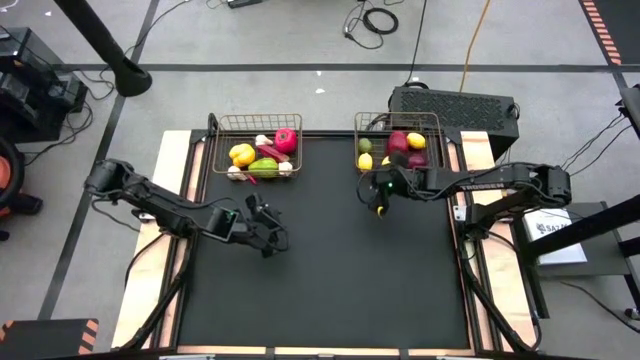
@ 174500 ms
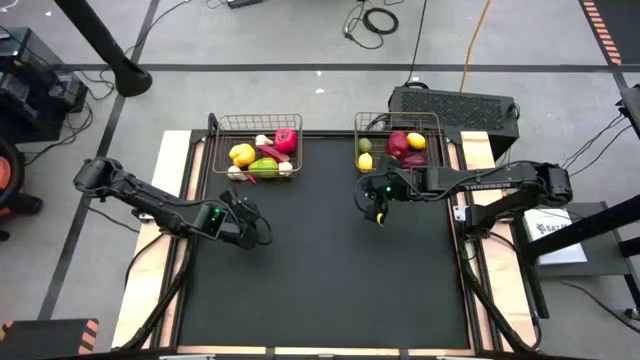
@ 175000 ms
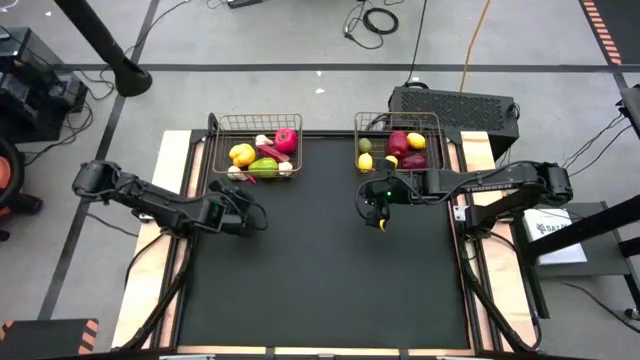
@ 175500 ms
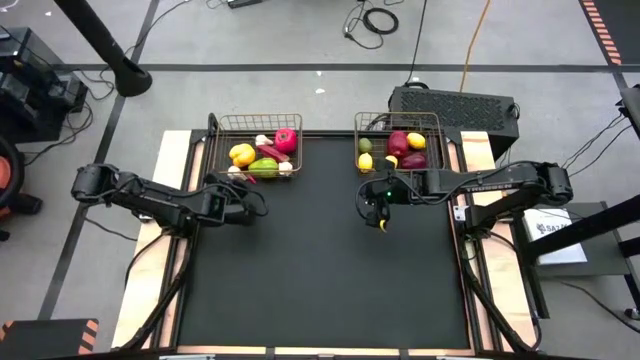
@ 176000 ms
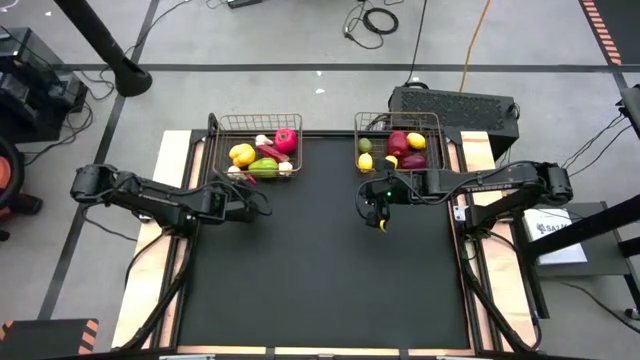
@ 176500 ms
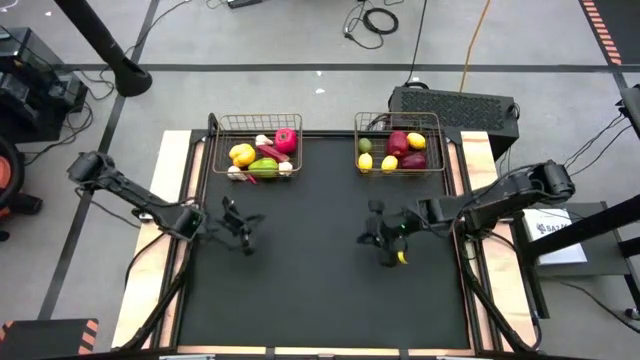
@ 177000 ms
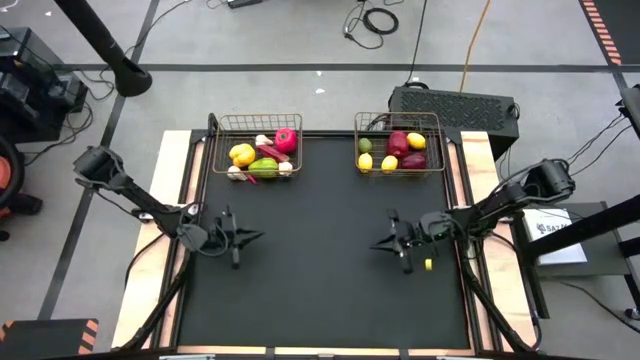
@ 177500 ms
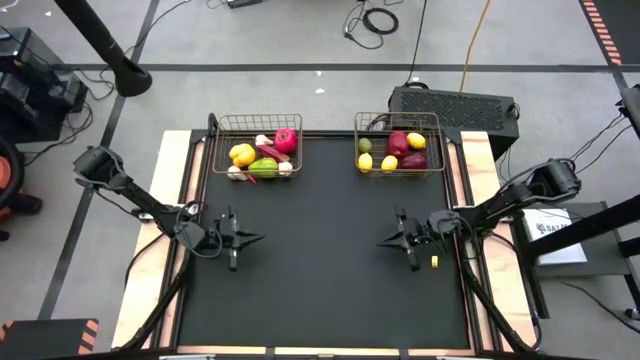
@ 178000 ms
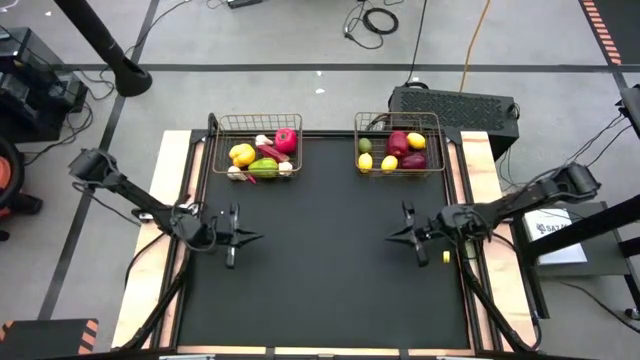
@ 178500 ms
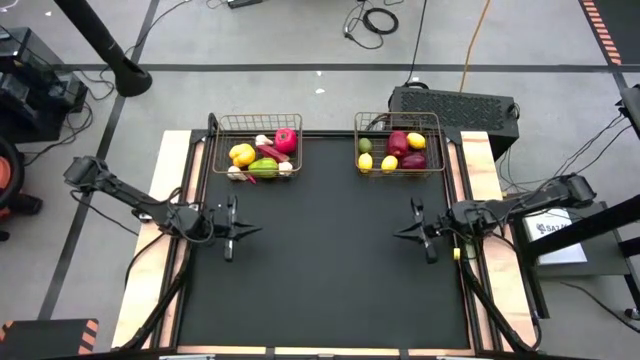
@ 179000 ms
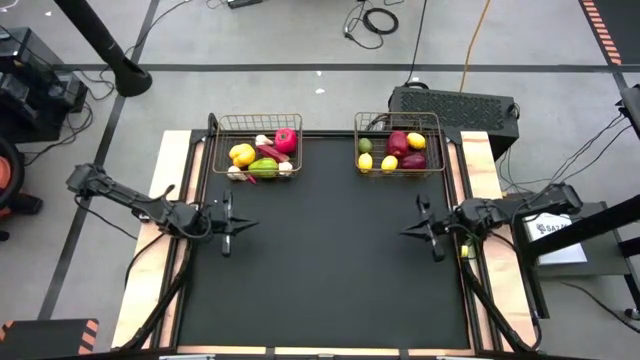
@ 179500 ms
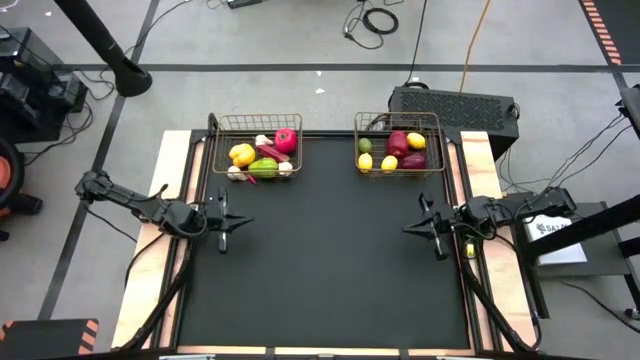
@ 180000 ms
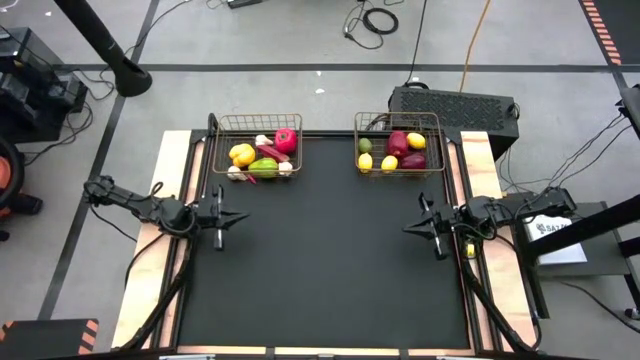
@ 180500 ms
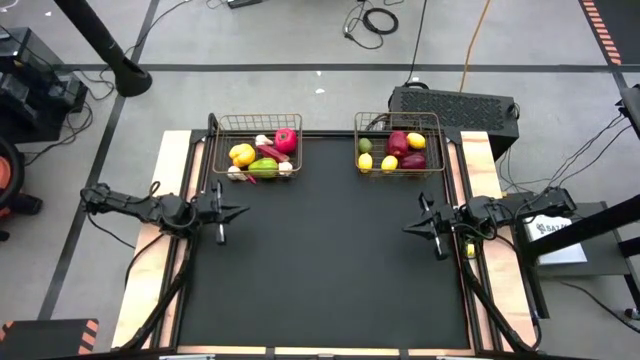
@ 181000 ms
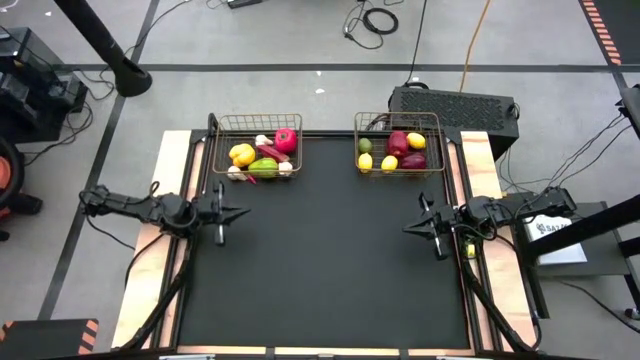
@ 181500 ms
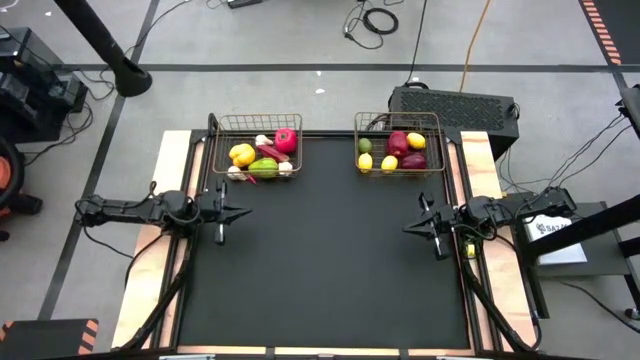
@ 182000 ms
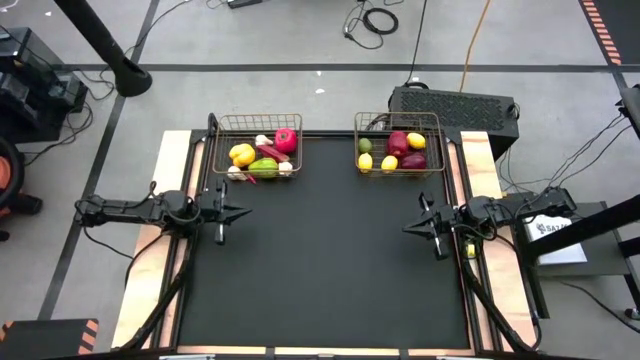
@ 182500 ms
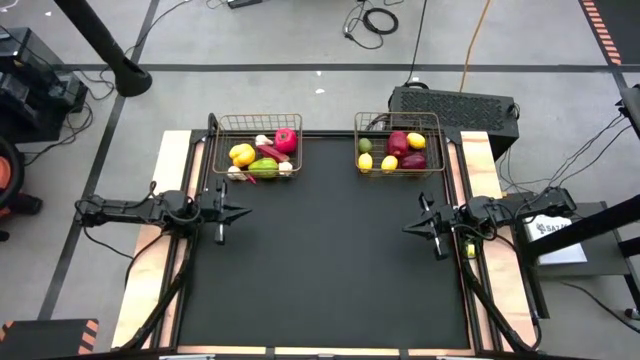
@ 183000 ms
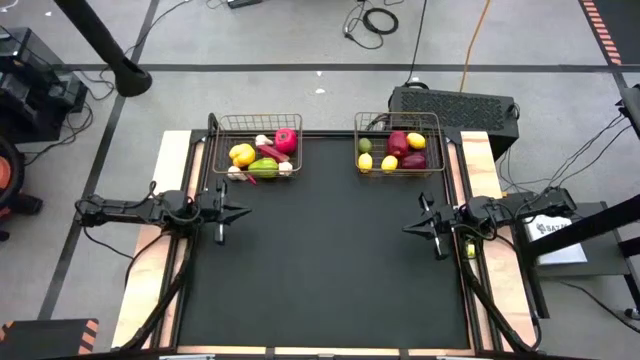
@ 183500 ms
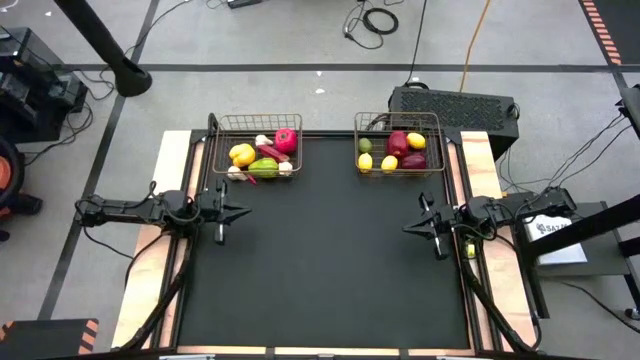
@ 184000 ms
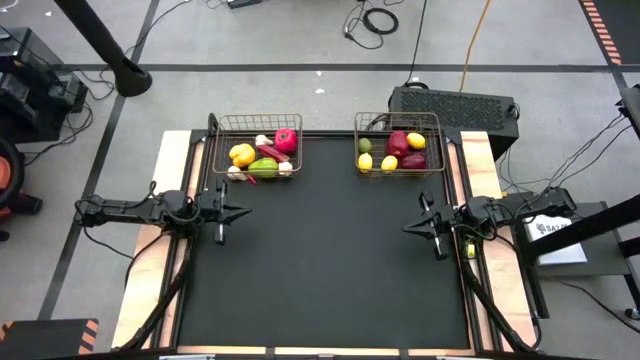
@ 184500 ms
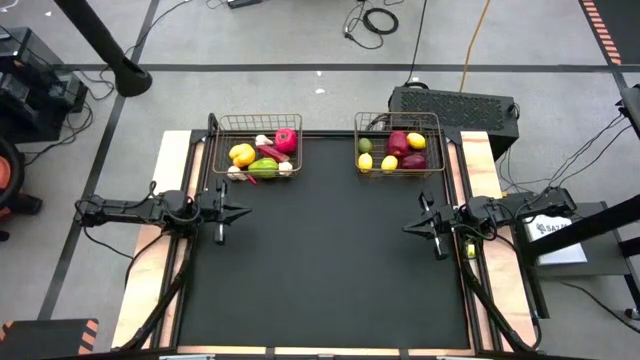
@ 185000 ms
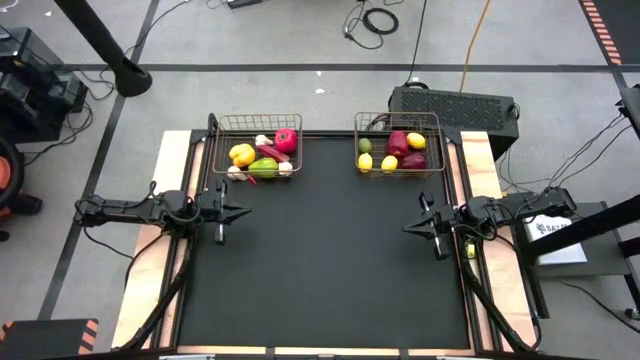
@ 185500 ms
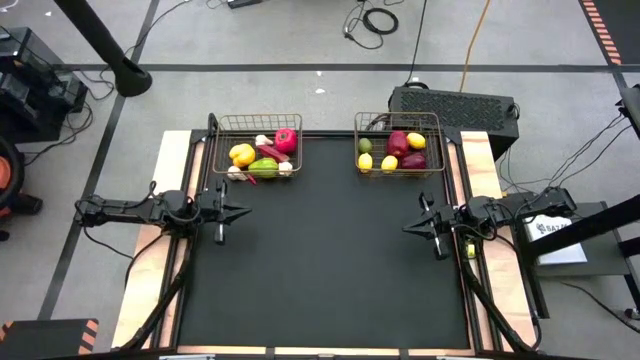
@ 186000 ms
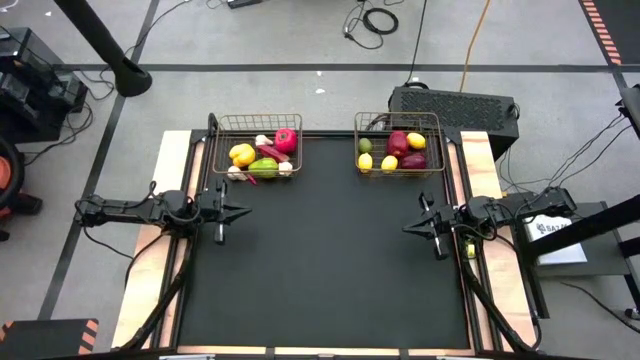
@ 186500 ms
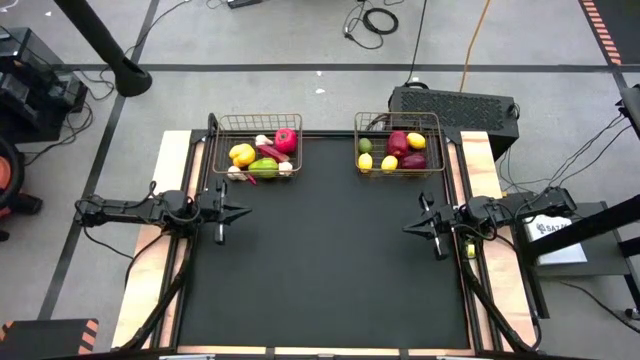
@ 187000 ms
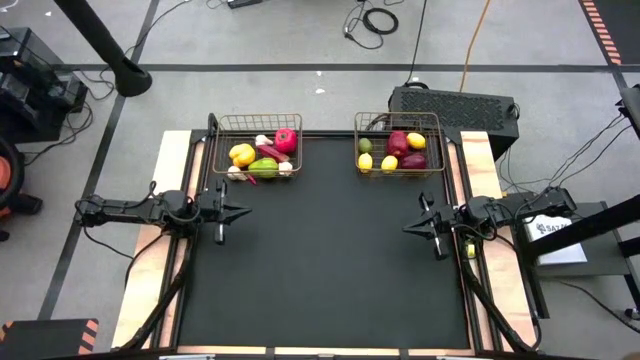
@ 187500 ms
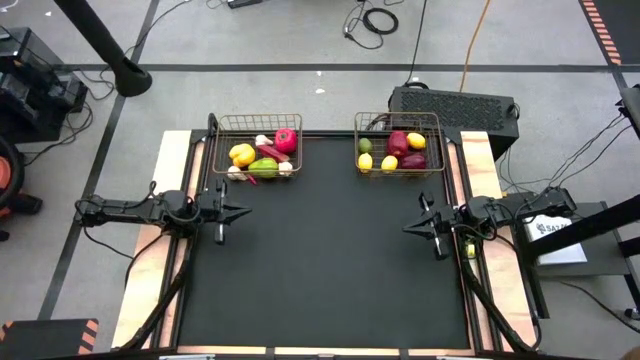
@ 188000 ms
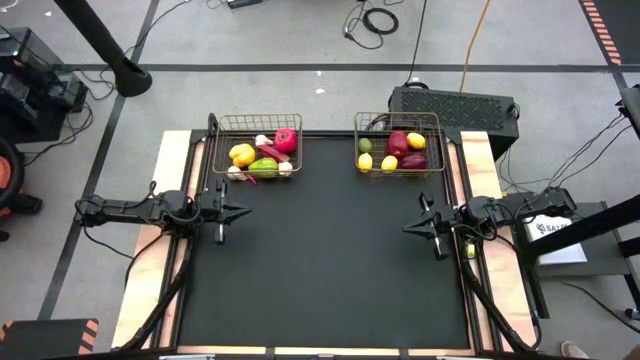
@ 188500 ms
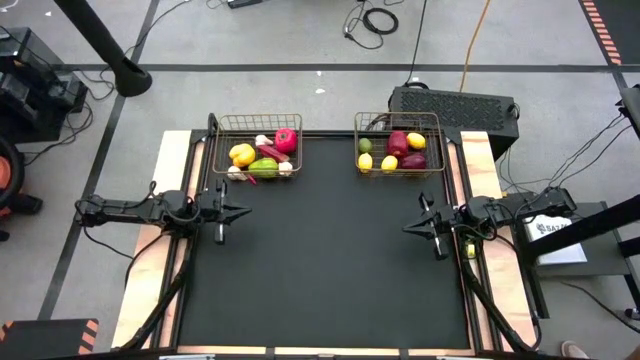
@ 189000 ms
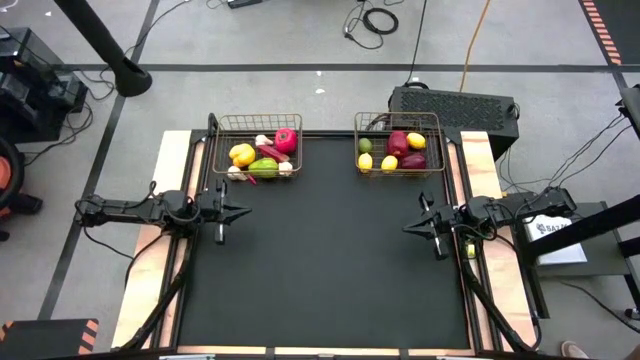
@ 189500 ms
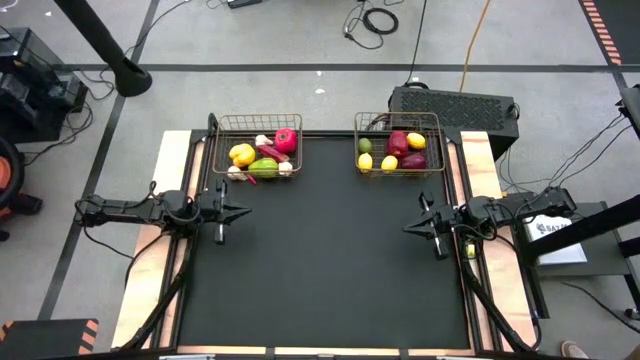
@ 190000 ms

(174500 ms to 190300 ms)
Task: Sort produce into baskets
Return to Home Position

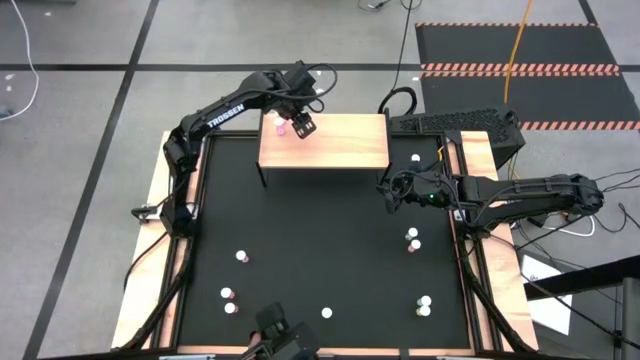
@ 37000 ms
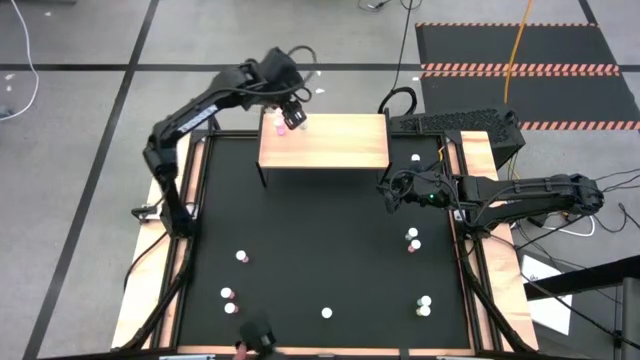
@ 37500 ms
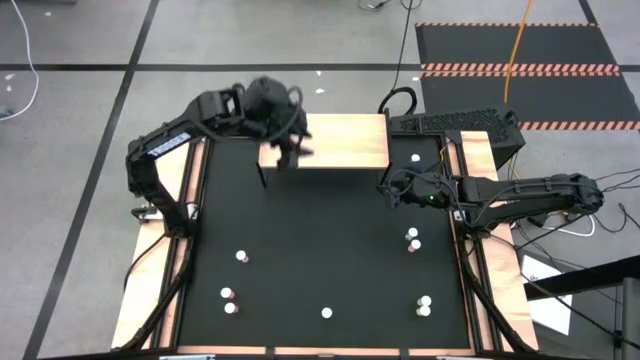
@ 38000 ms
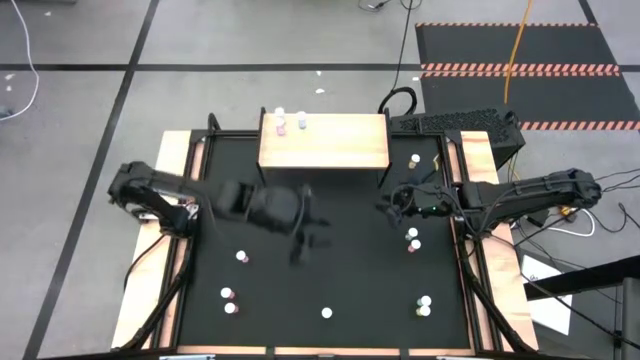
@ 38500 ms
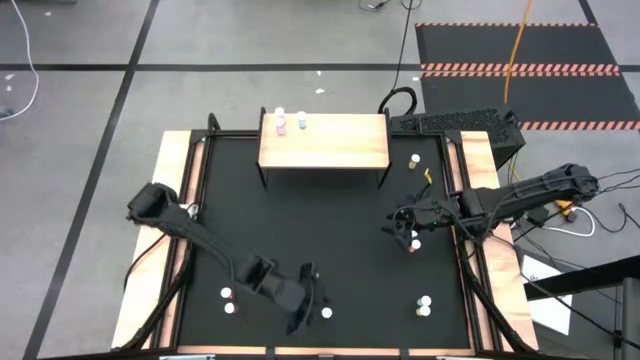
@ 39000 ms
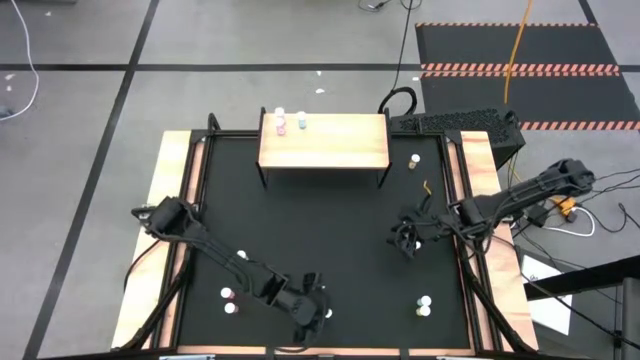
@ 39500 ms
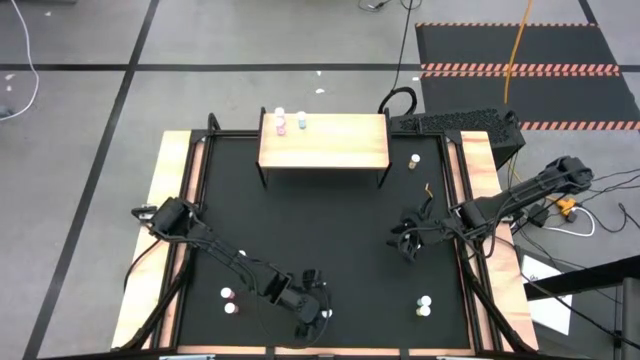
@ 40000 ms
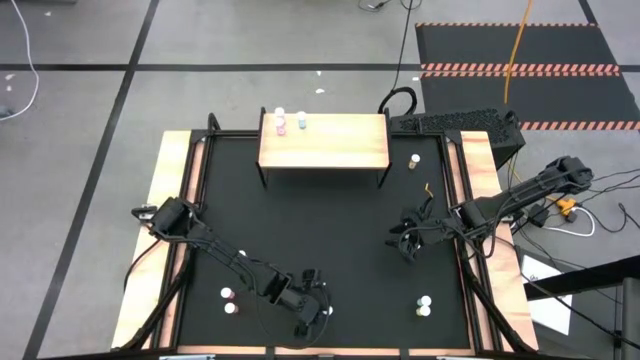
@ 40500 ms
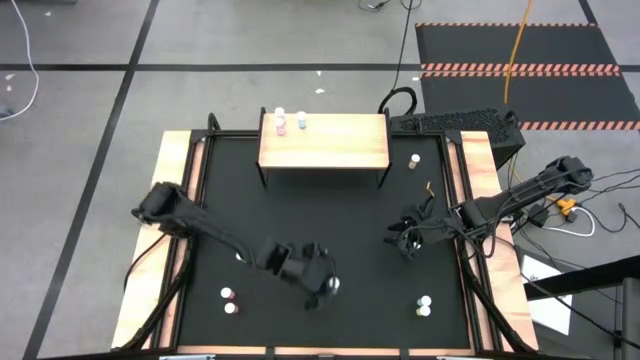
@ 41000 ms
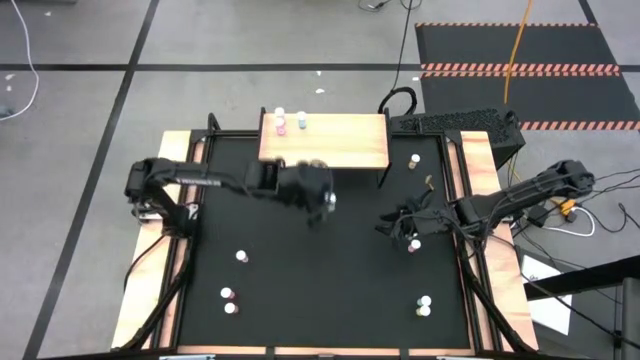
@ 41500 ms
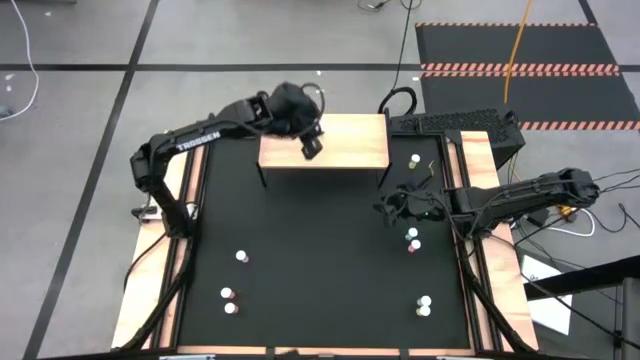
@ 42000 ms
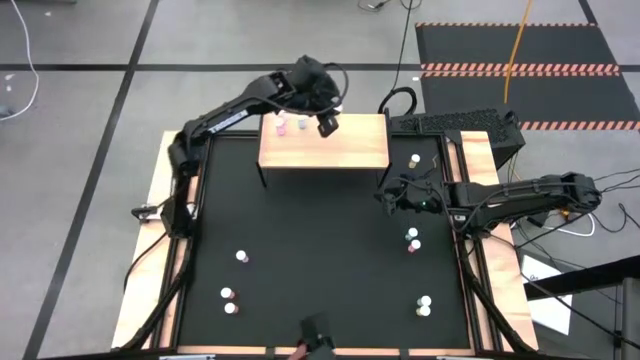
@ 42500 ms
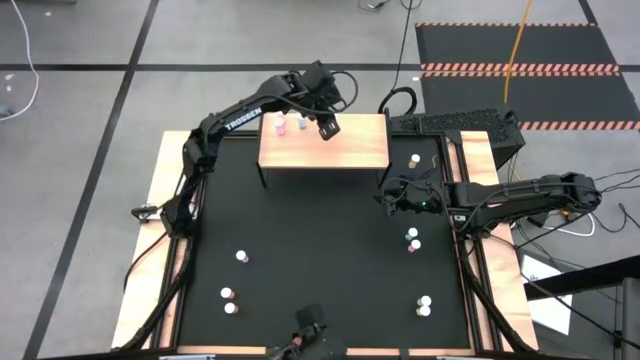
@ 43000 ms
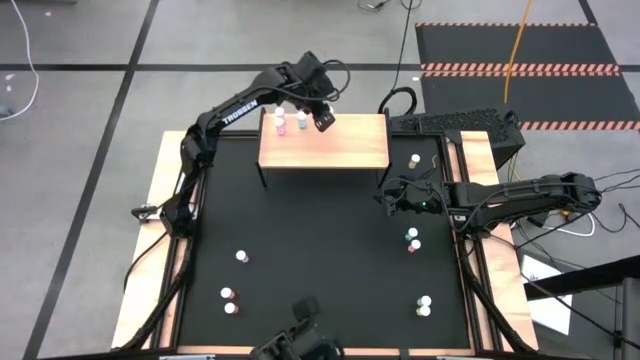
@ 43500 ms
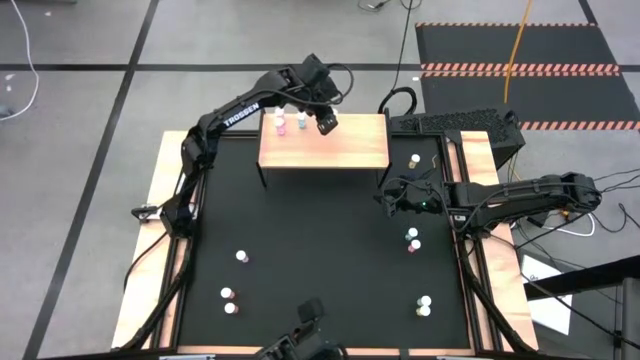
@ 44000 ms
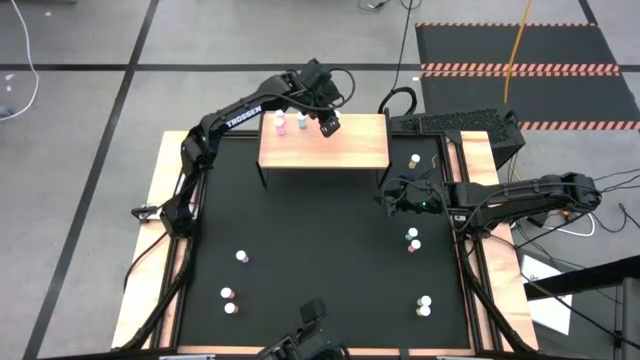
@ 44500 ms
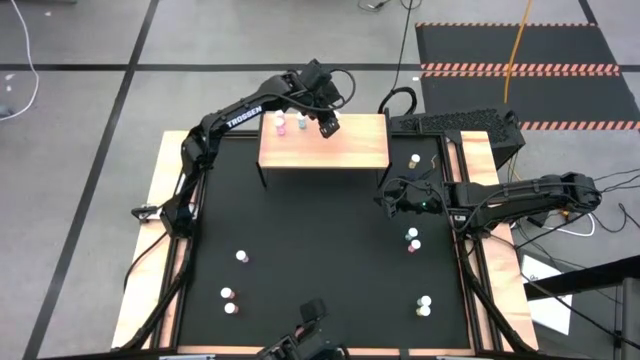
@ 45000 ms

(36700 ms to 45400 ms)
Task: Pick and place medicine bottles onto shelf by color
Put the bottom left yellow pill bottle on the shelf
